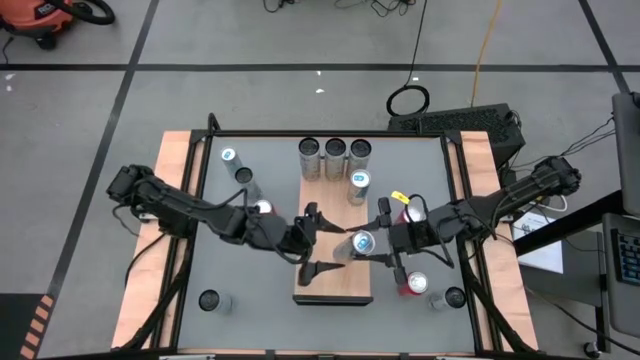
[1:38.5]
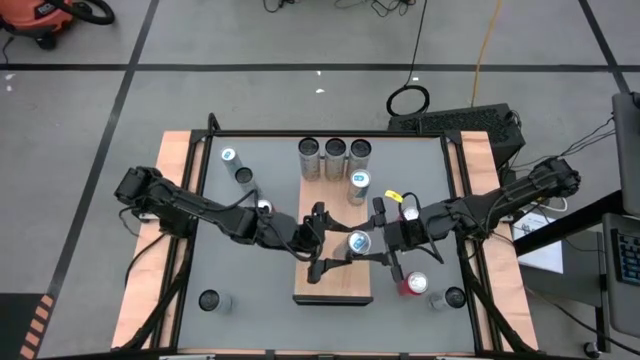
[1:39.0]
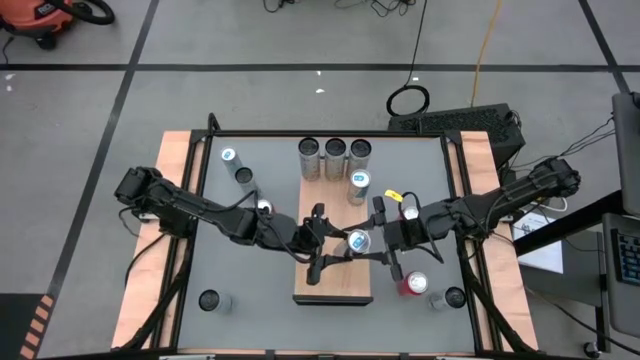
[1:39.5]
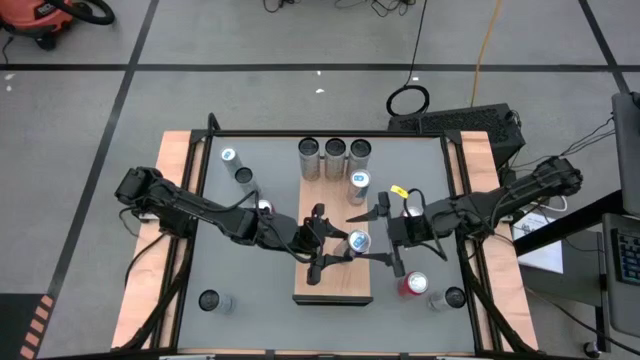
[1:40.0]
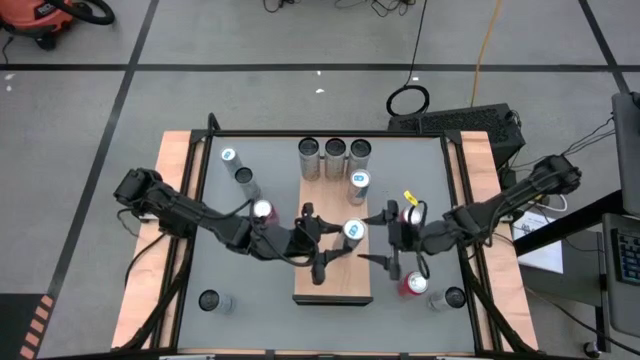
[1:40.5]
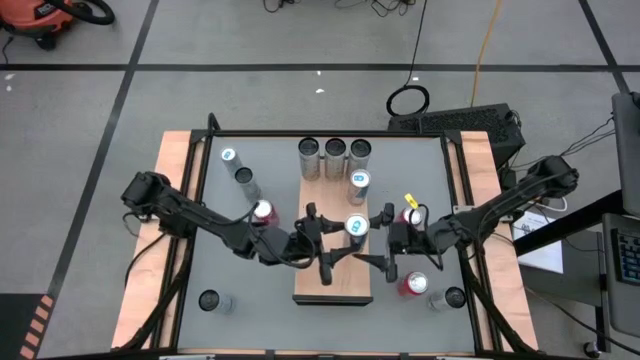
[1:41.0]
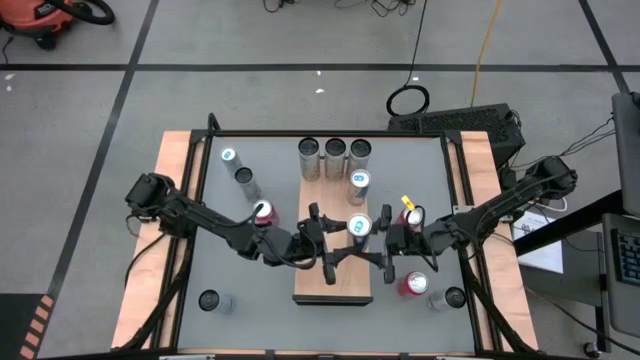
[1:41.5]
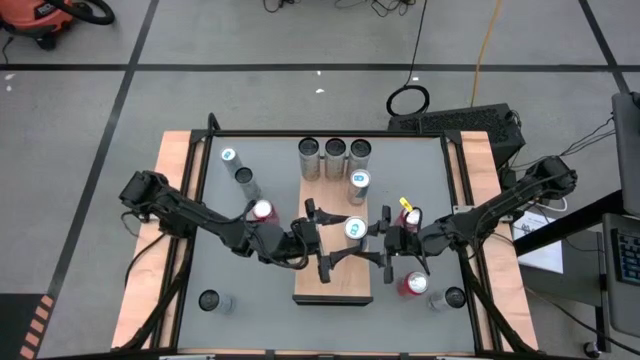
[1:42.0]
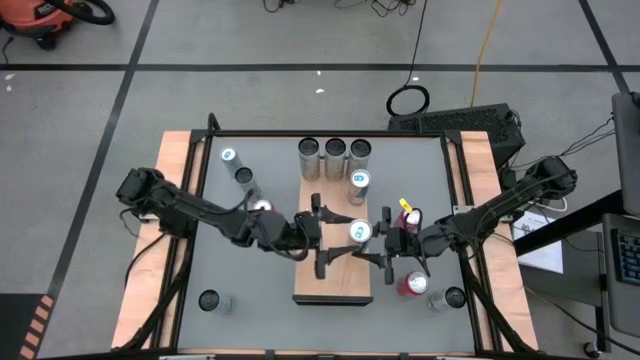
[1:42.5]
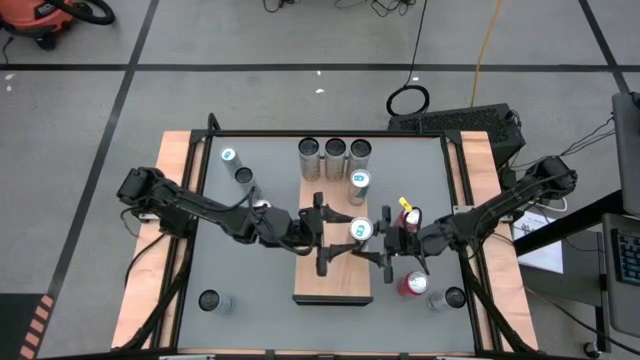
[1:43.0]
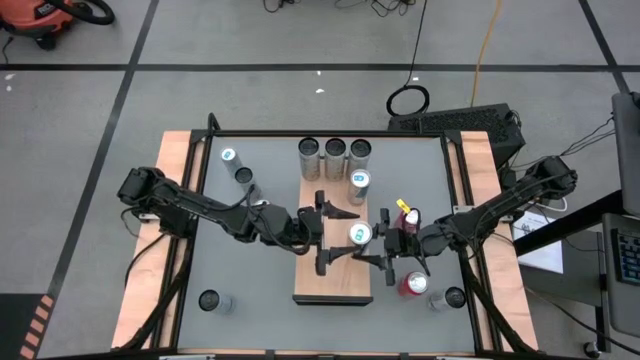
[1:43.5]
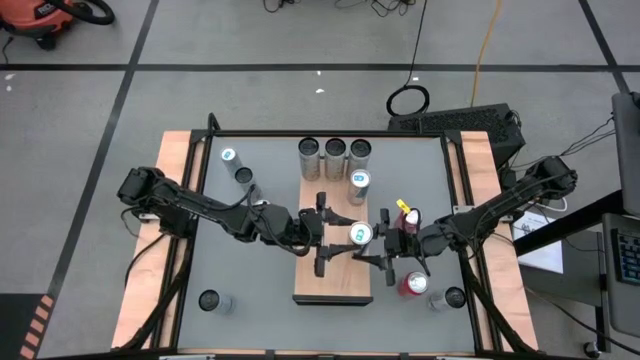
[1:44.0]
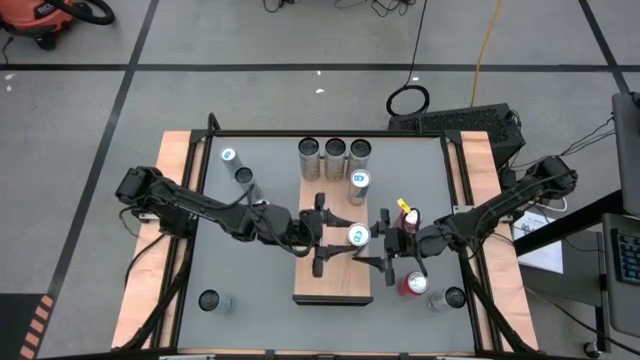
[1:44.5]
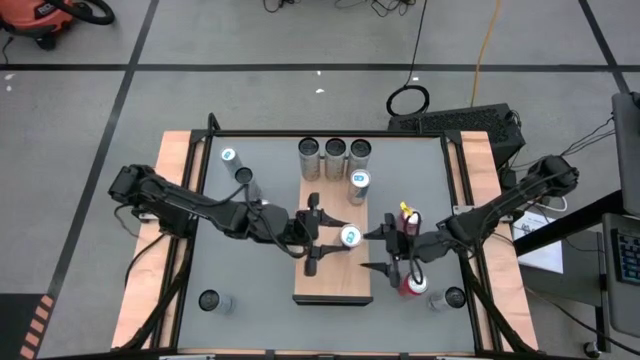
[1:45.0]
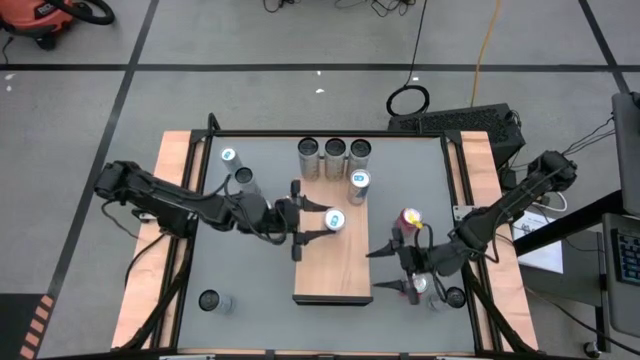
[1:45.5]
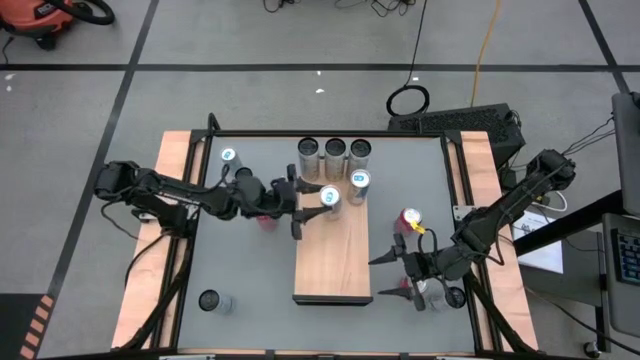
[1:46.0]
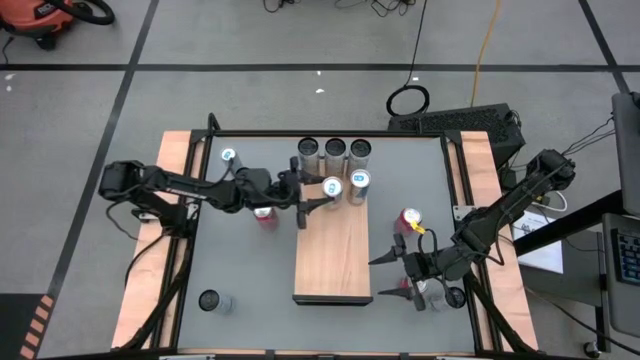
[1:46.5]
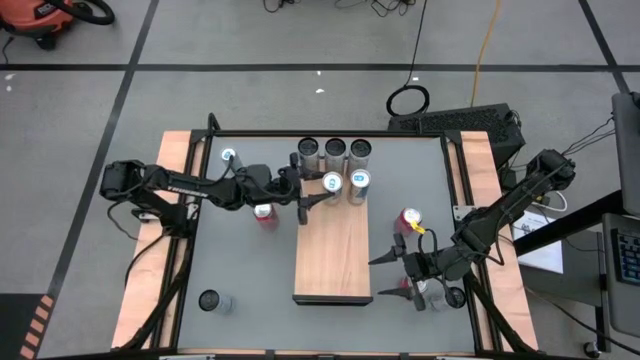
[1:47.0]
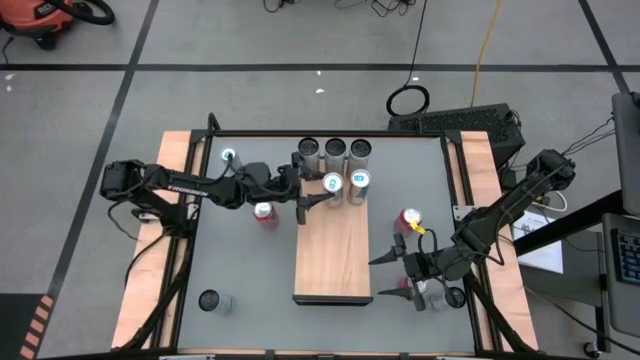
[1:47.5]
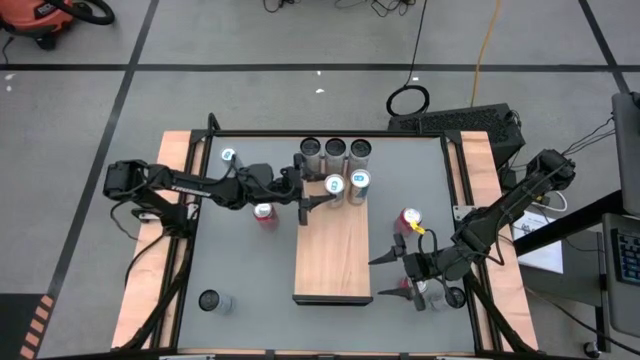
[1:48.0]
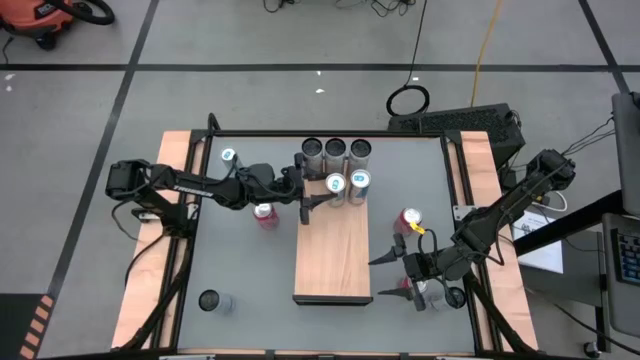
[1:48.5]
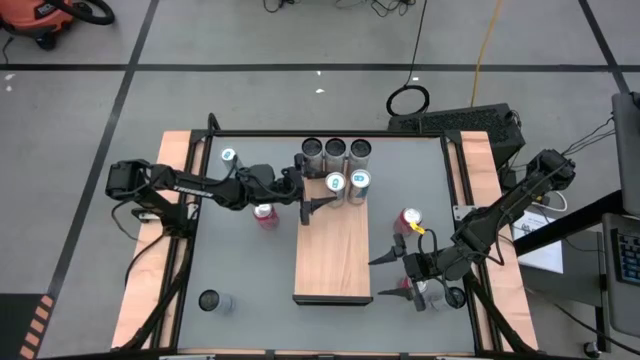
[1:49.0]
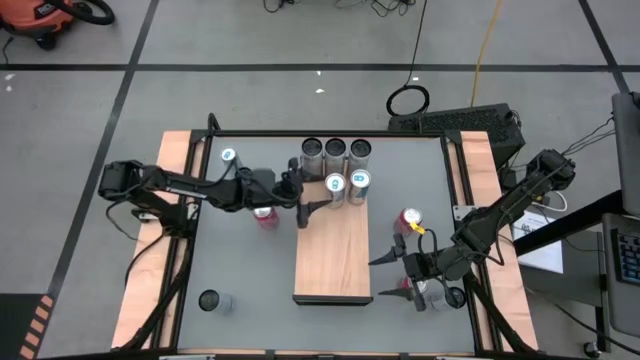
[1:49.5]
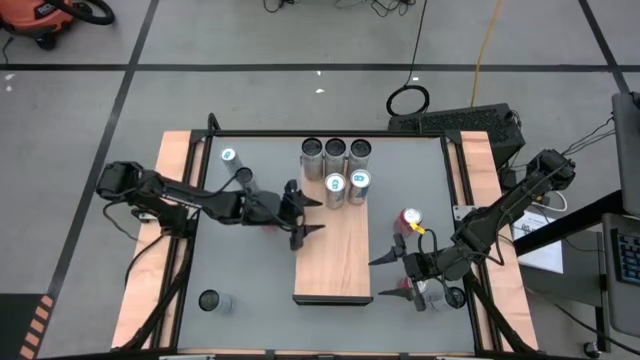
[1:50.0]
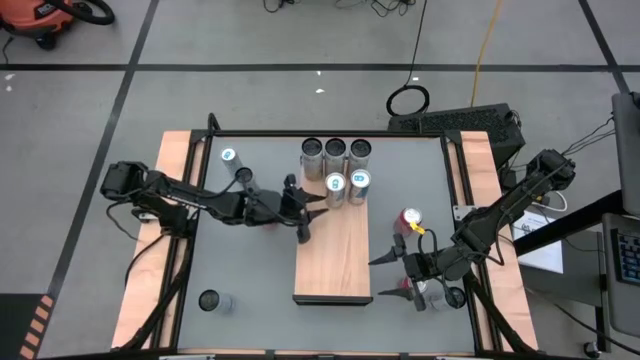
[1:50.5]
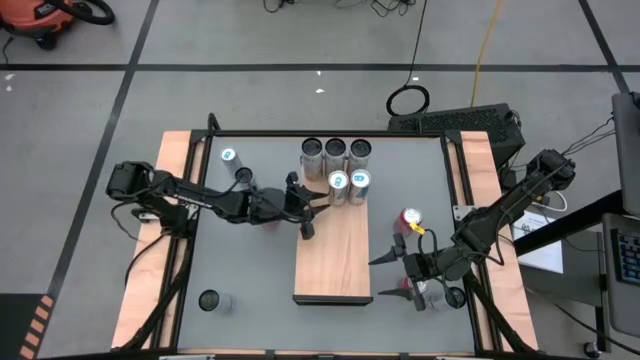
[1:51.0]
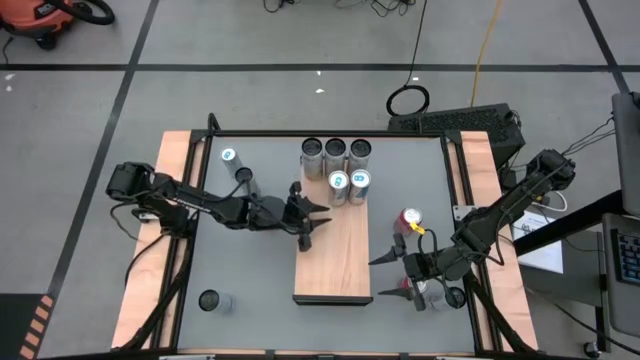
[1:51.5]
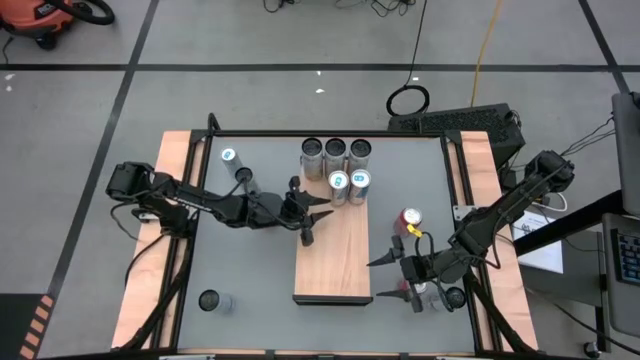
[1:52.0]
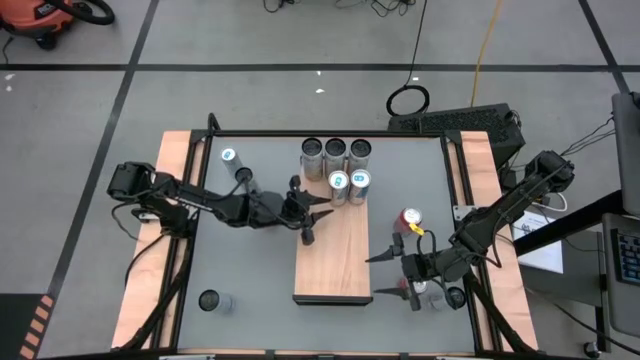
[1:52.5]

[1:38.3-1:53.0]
Task: Place canned beverage on shelf
Put the right blue soda can on the shelf aligned with the other blue soda can

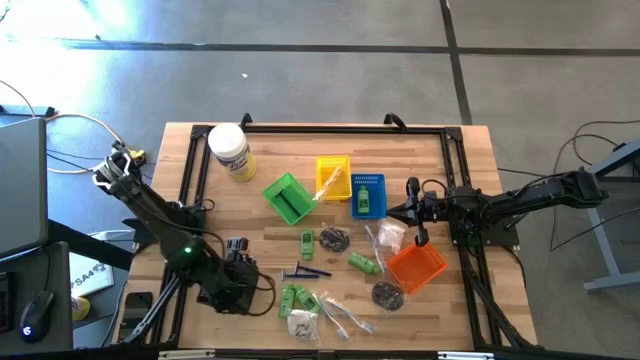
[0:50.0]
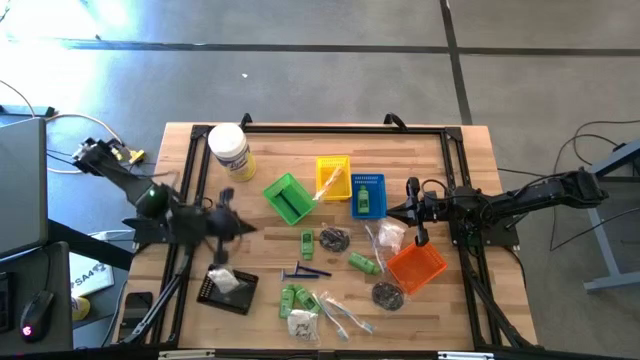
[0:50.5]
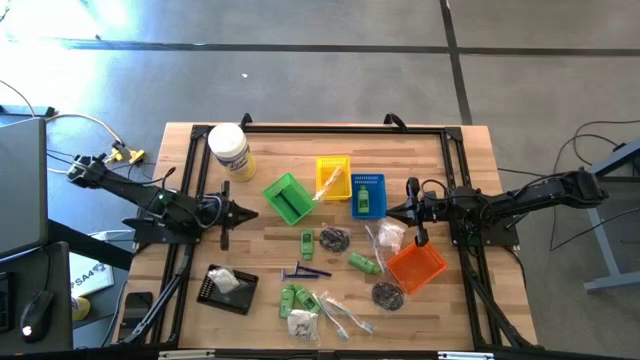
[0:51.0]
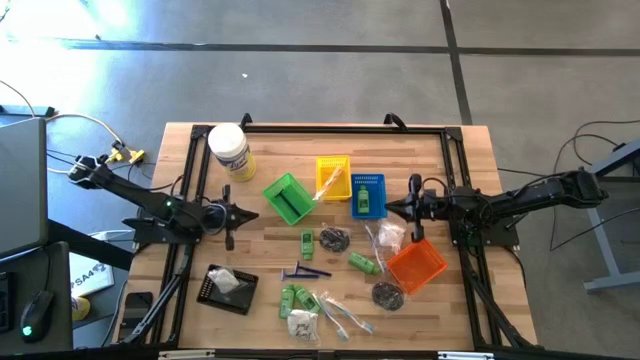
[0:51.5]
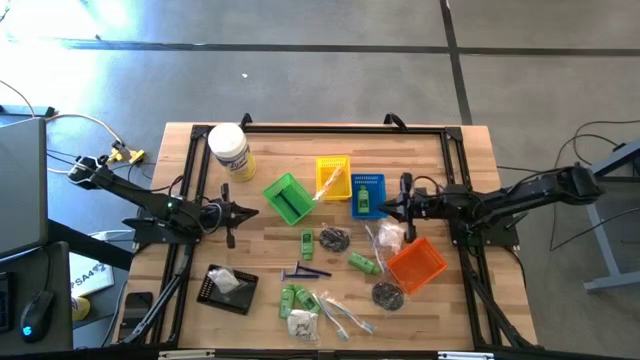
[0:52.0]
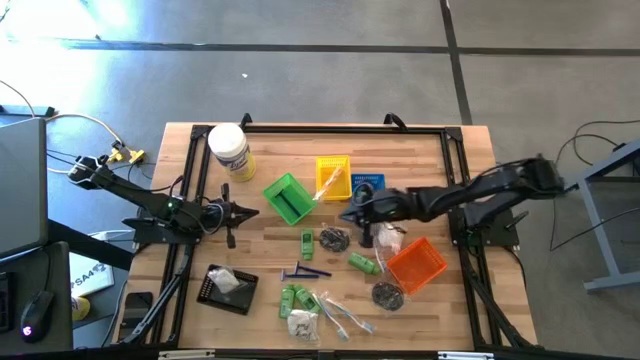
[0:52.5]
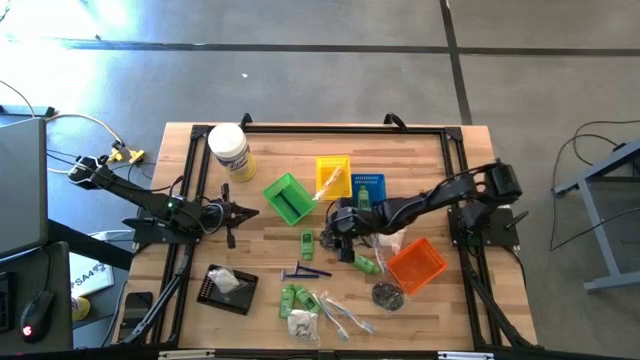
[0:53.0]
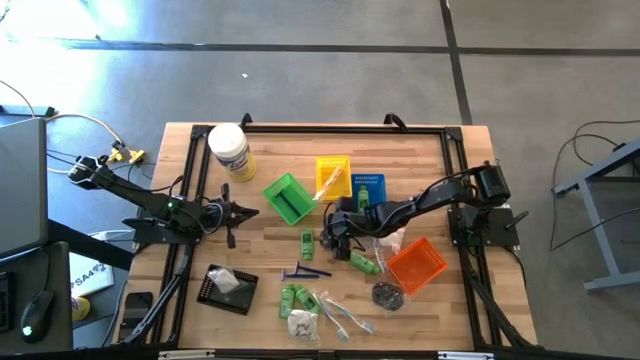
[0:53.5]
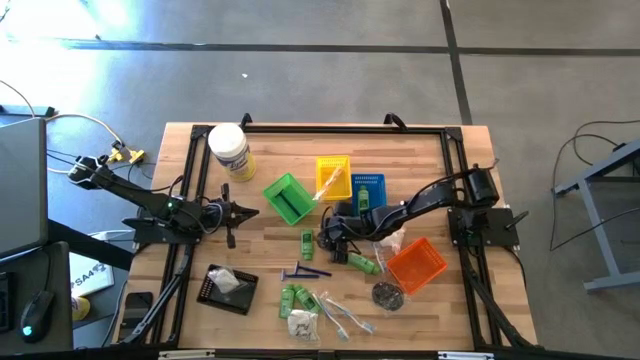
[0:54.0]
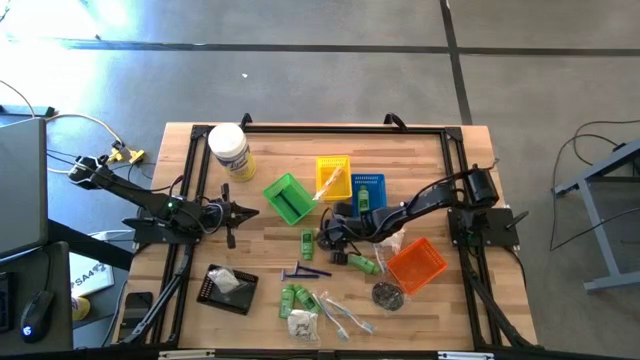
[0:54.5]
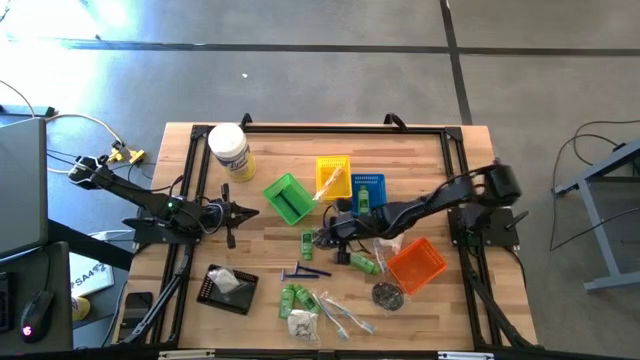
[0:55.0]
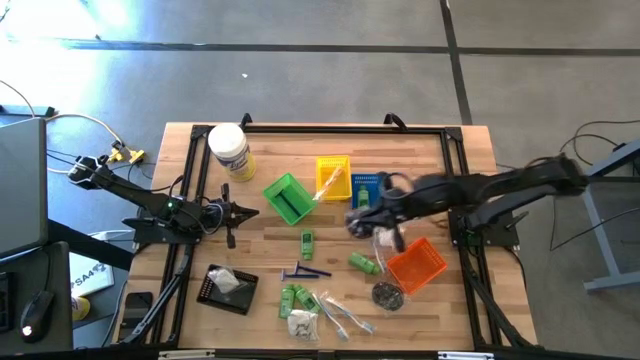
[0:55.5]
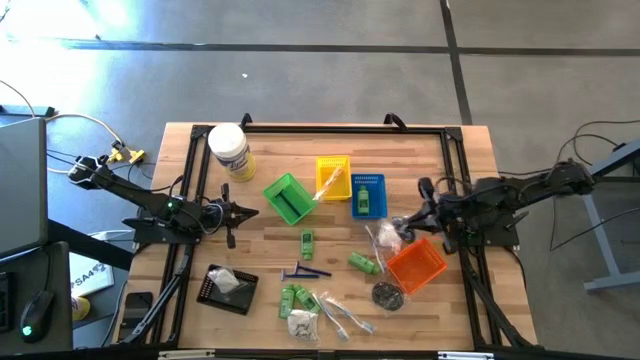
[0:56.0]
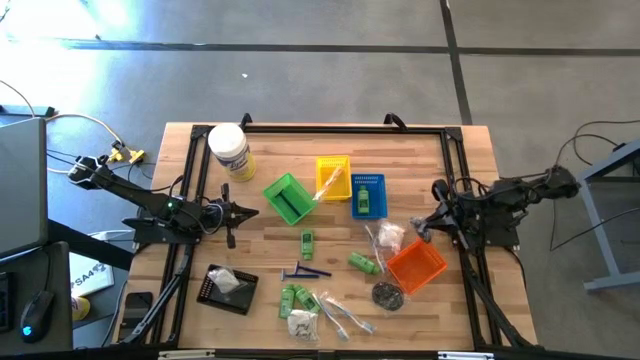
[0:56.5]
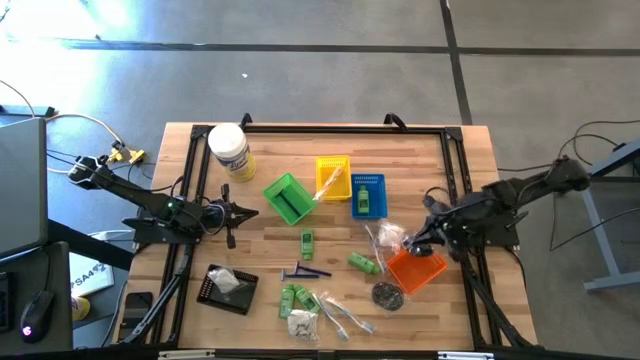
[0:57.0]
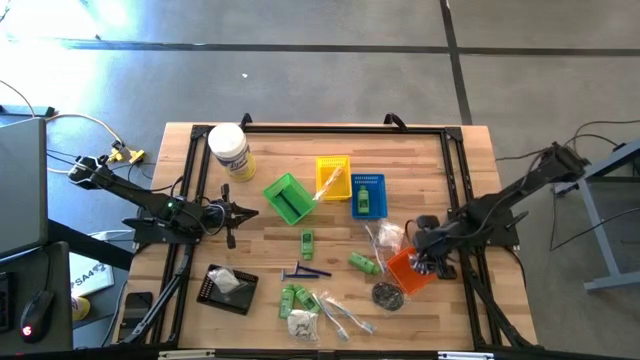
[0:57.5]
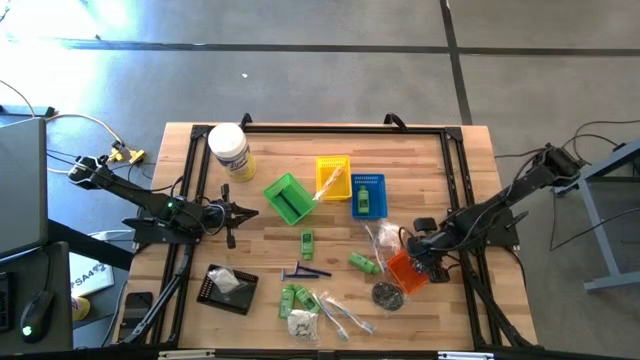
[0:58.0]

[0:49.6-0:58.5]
Task: Pick & Place Travel size toiletries
Put the black hairbrush into the orange basket
